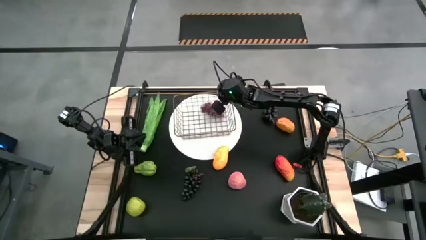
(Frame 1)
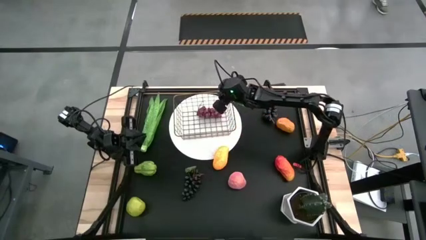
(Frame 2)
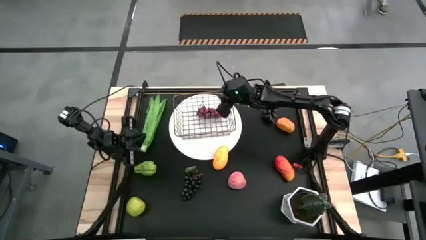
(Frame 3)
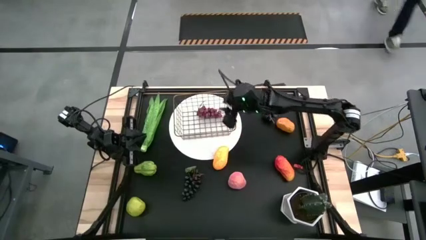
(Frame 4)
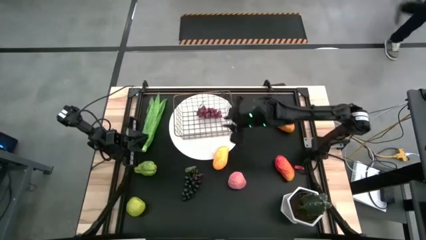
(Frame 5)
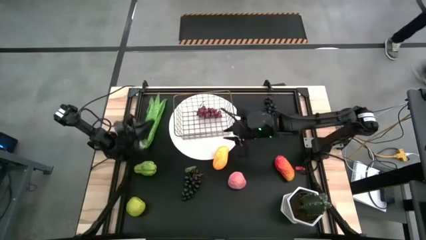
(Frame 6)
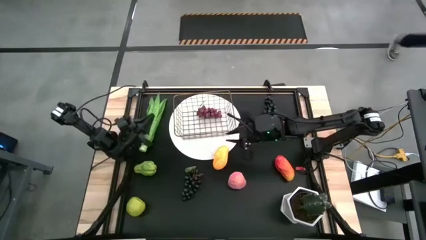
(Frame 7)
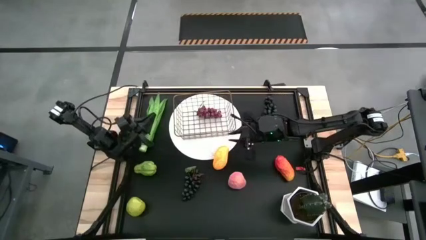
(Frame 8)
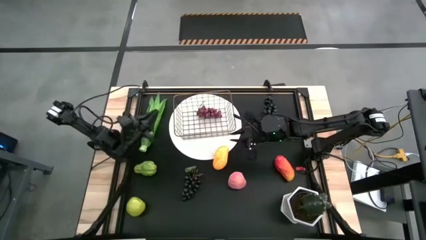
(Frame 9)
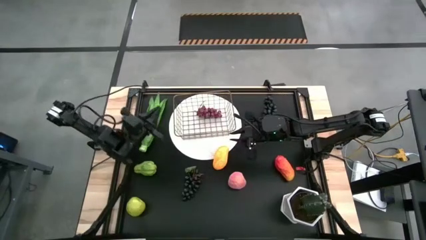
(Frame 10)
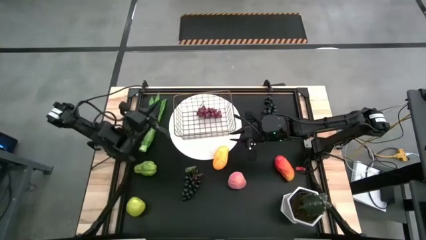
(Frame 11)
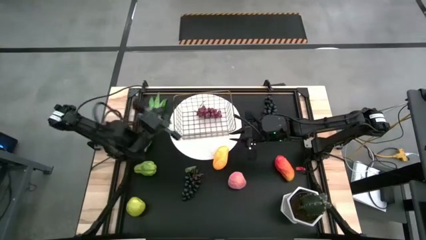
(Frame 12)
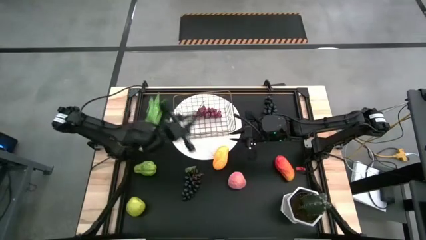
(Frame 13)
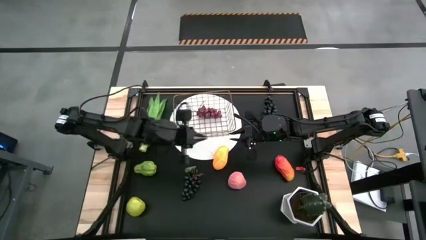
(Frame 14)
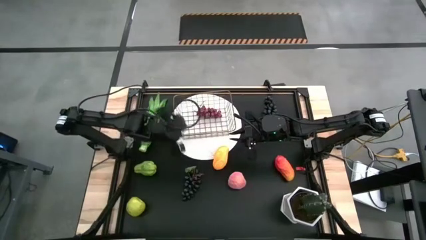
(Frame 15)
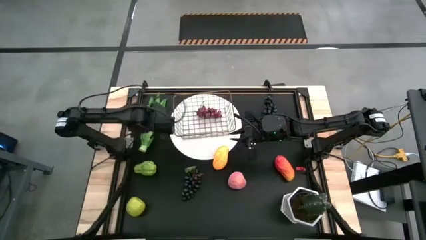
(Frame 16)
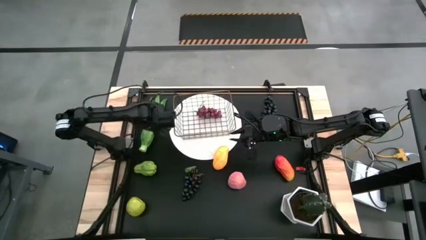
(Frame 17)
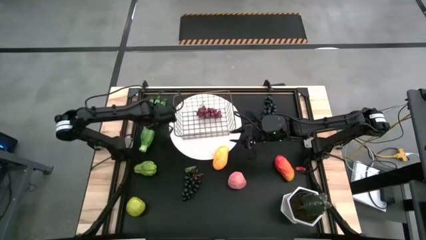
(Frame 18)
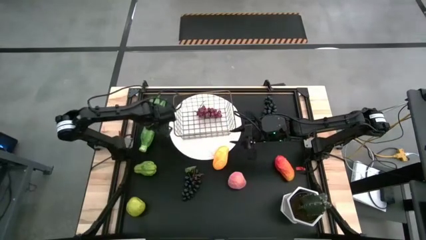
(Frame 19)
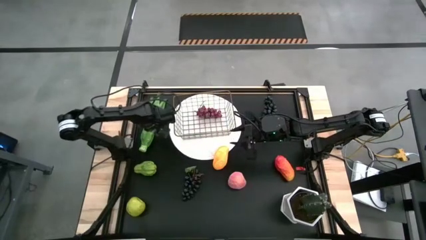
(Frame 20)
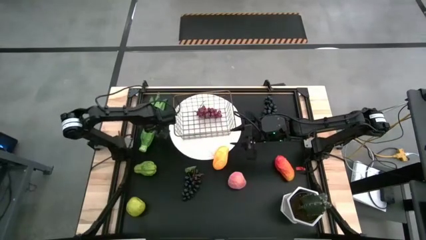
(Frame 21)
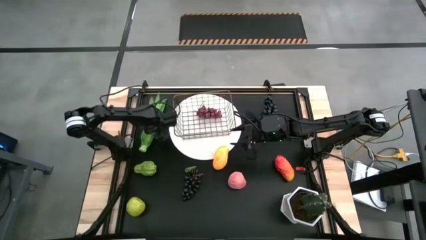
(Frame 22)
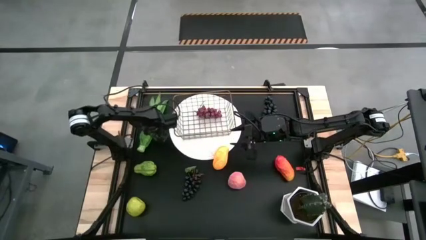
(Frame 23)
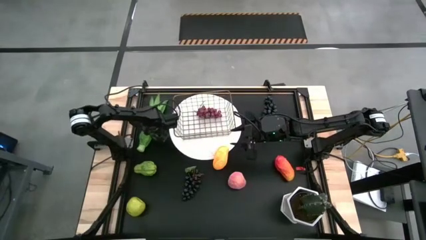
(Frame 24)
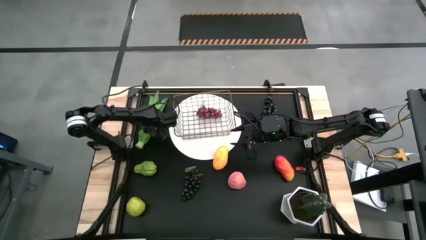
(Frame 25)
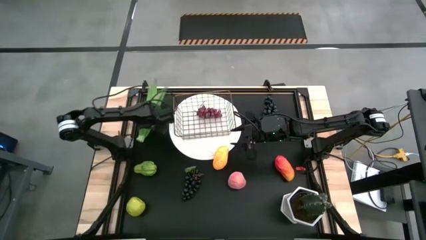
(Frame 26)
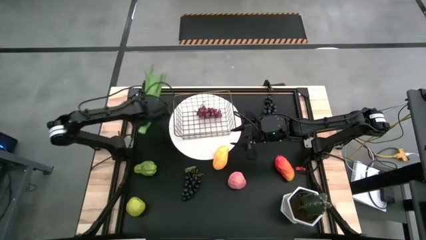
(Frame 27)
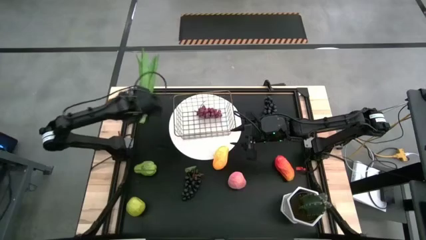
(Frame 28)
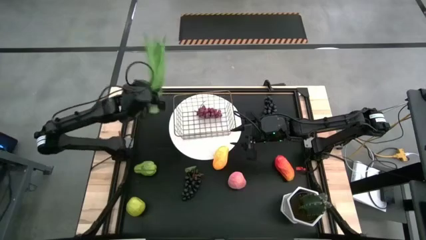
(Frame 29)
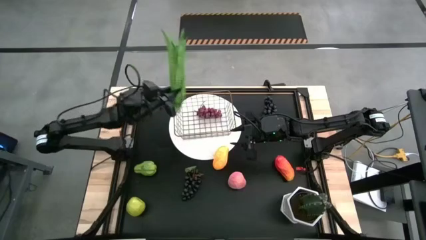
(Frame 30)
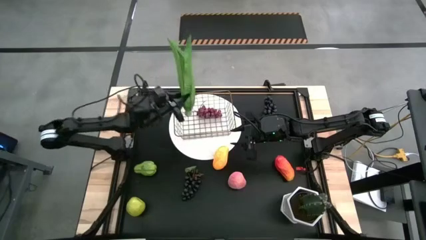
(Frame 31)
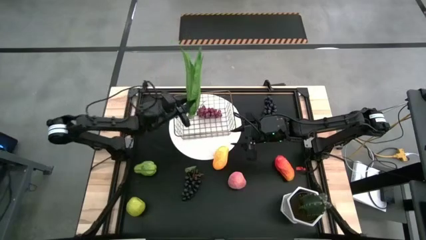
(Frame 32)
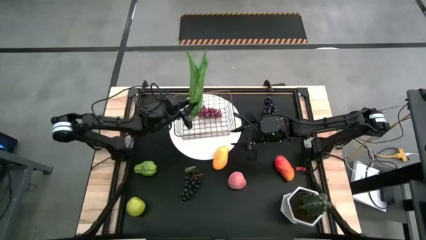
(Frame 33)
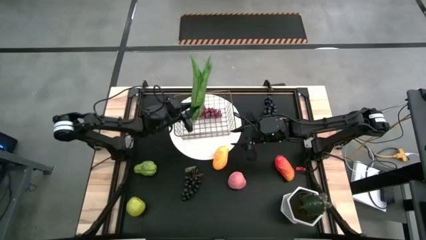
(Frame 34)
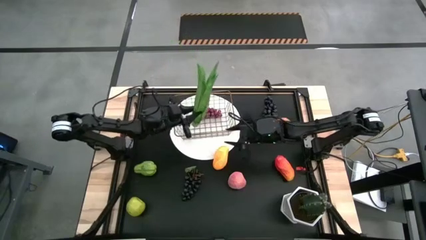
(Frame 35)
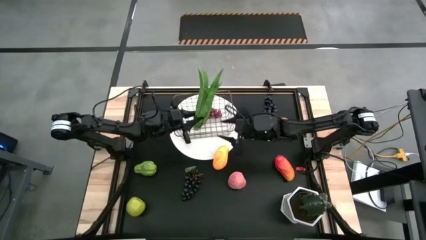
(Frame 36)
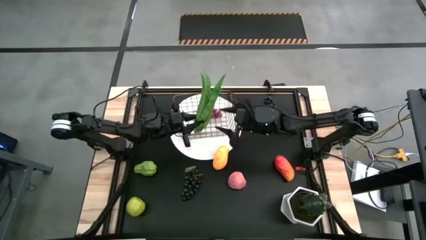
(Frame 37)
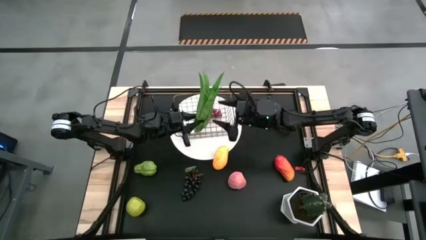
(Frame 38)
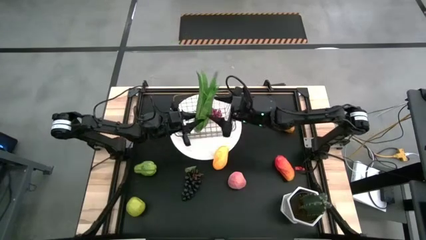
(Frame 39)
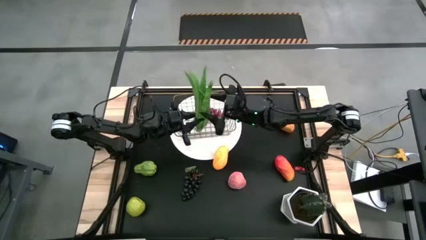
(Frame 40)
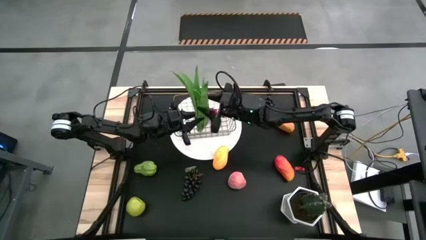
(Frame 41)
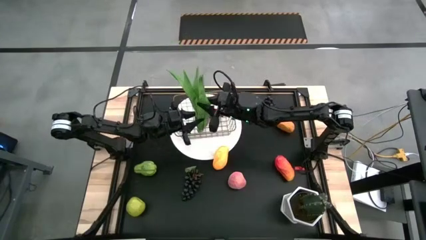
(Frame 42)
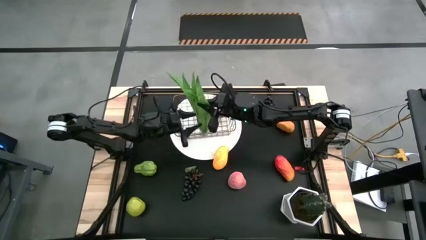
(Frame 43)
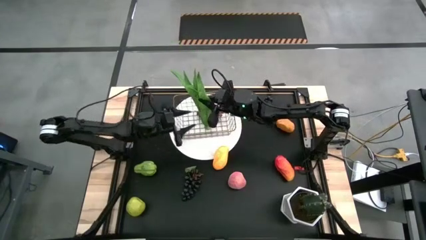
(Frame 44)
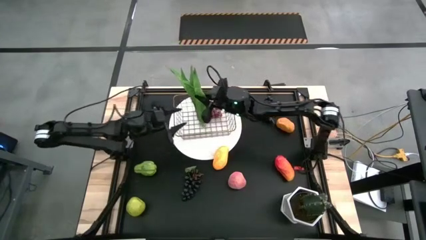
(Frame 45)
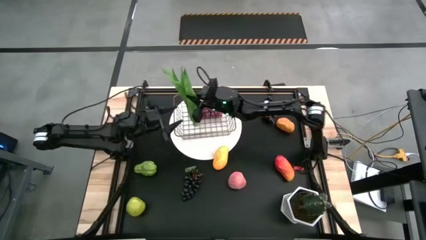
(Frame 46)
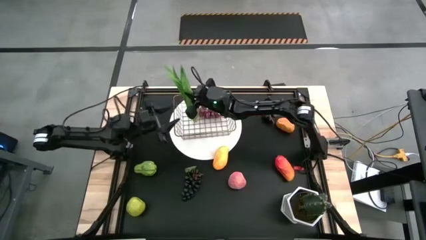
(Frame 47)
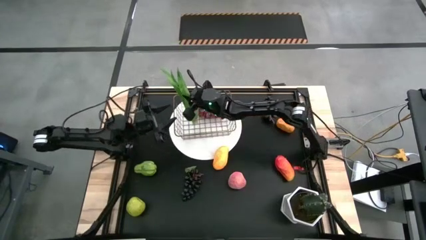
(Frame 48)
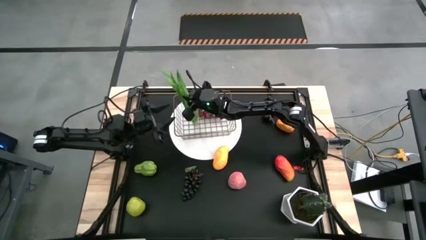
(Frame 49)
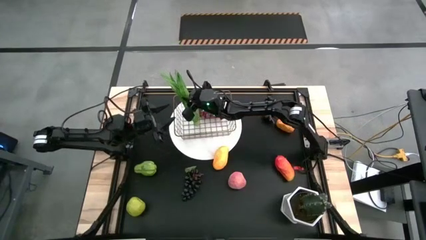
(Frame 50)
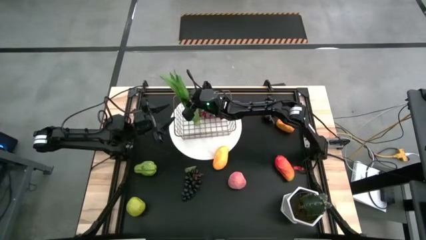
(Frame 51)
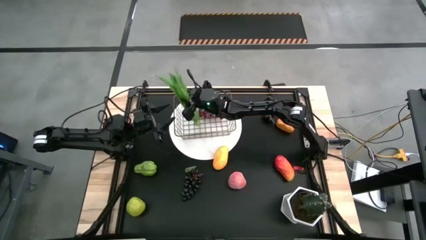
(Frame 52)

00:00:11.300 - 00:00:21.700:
Task: Build produce basket
Put the green leaf lettuce into the gold wire basket

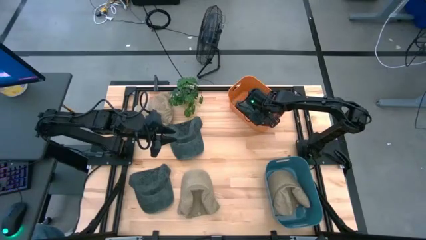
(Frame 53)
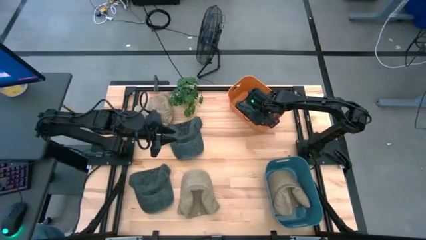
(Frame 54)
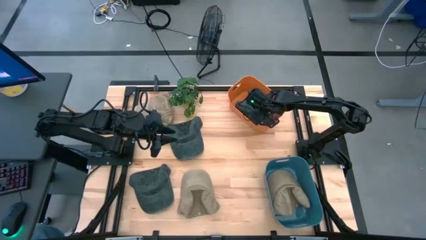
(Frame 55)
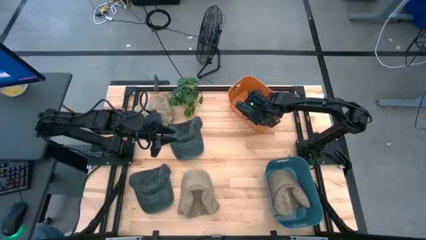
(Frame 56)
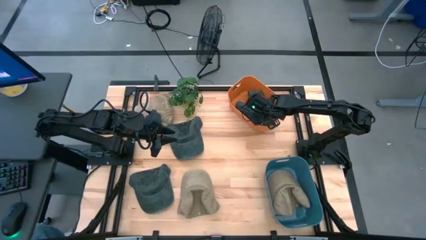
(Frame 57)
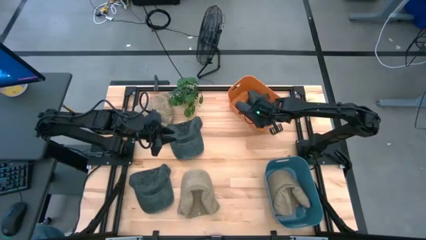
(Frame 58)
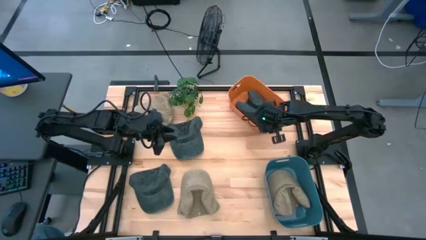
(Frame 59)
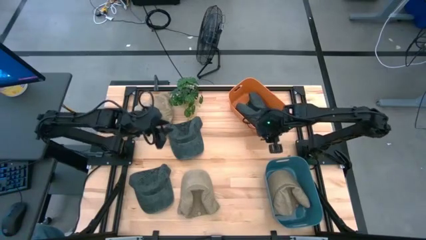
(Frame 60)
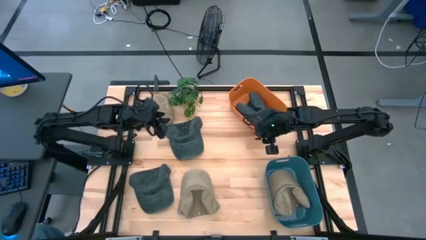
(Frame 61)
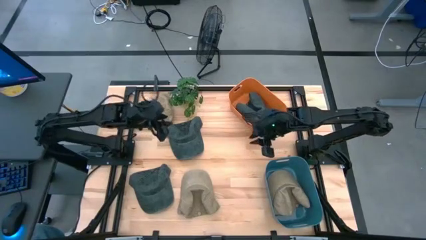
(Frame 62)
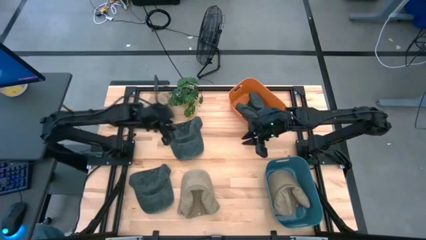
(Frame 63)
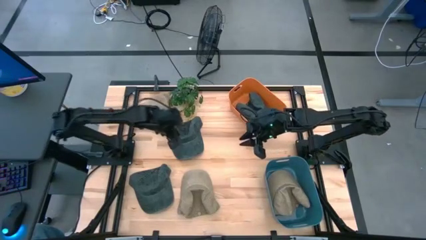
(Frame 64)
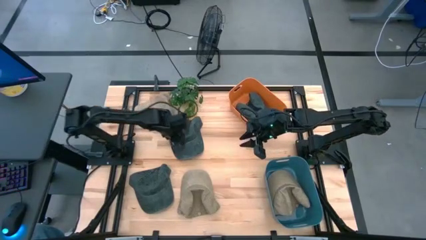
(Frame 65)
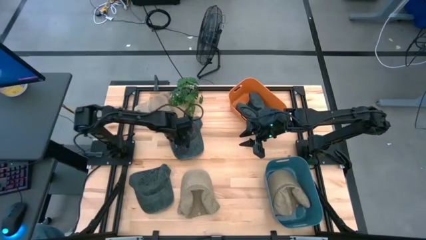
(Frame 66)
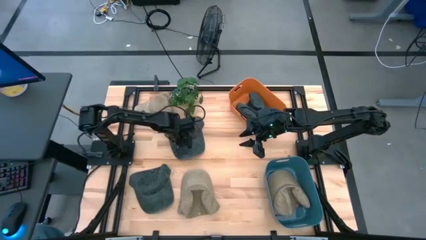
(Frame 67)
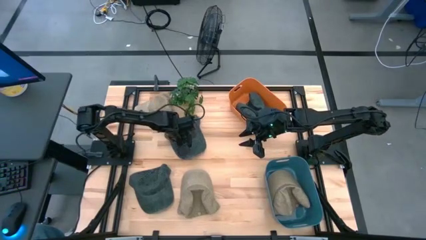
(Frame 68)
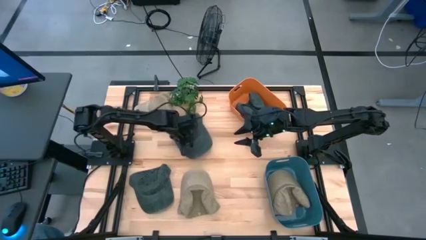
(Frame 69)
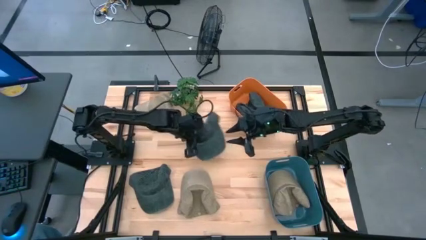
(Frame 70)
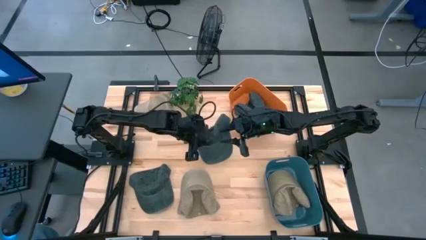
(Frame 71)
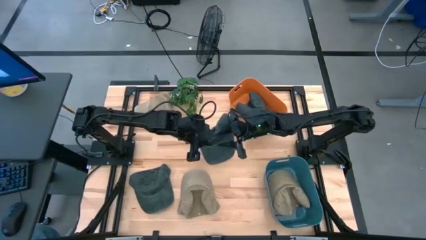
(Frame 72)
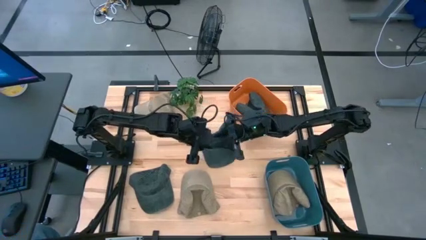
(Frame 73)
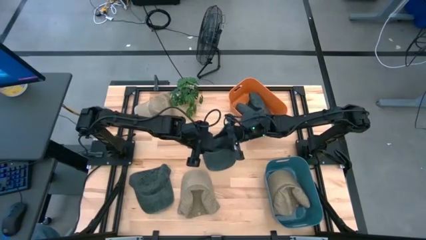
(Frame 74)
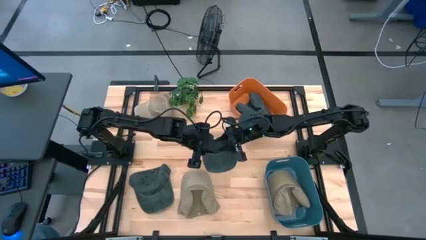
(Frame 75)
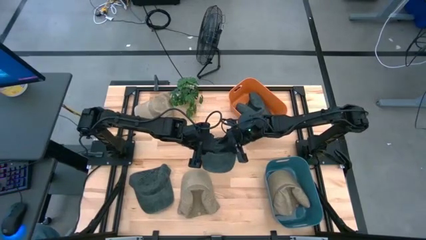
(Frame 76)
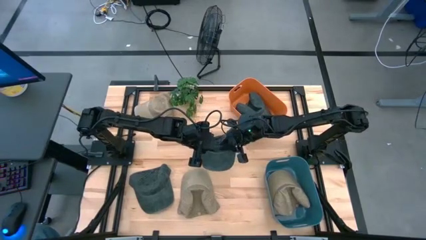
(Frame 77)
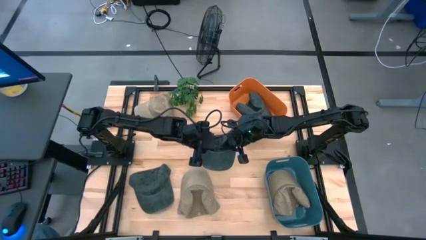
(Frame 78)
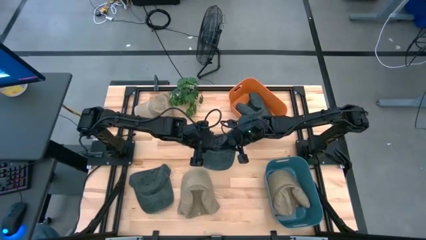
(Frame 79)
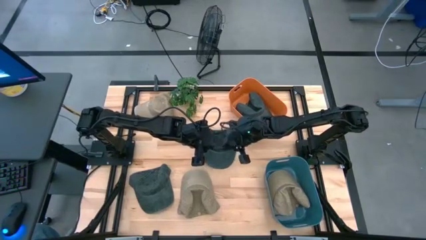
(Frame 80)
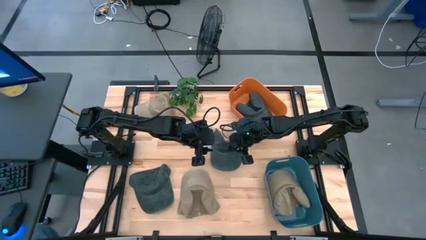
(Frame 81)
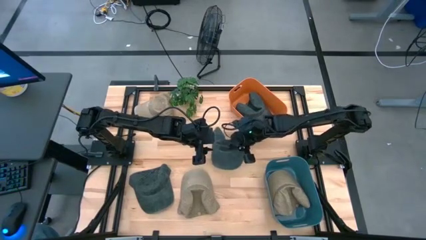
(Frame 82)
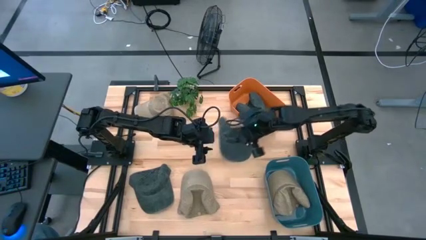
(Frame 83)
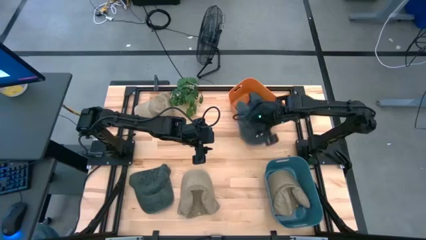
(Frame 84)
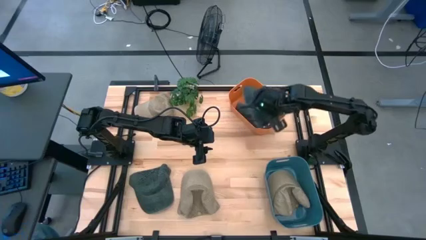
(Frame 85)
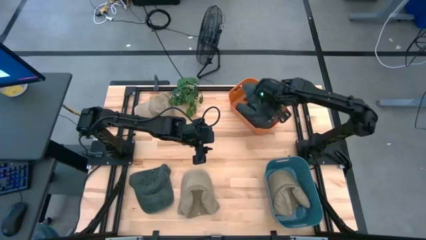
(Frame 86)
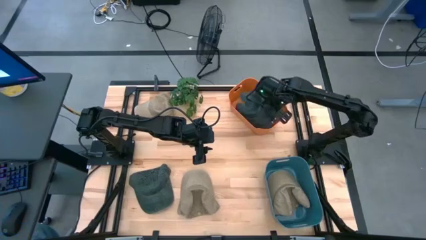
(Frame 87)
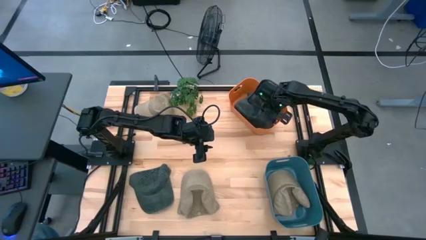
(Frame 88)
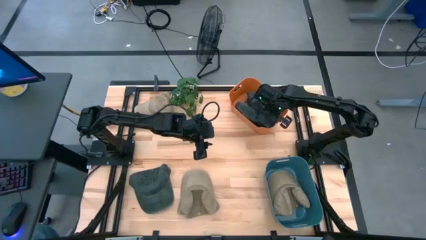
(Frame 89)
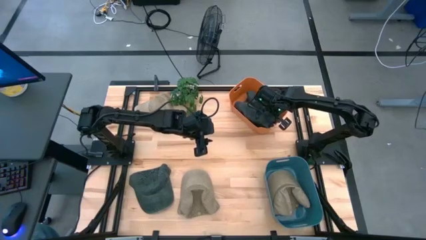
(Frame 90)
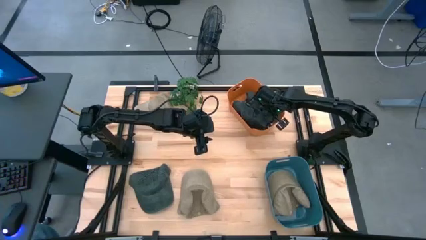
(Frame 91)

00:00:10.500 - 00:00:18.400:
Task: Pick & Place hat
Put the top gray cap into the orange bin
